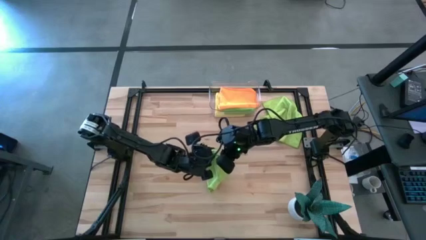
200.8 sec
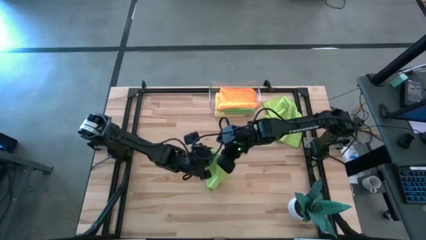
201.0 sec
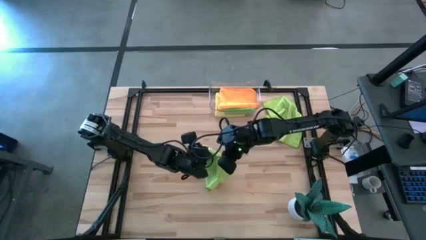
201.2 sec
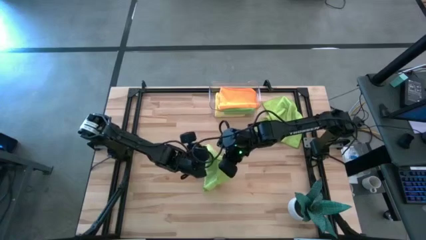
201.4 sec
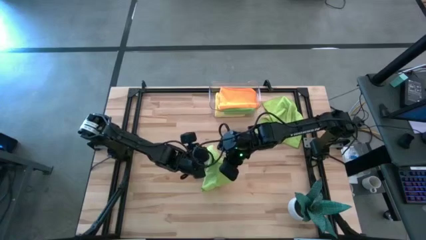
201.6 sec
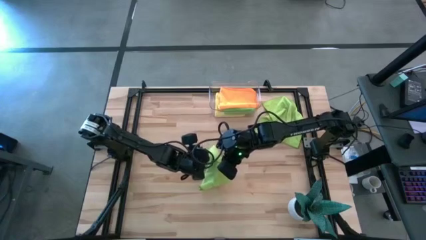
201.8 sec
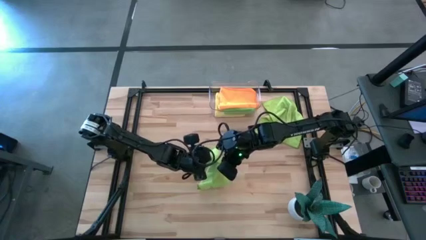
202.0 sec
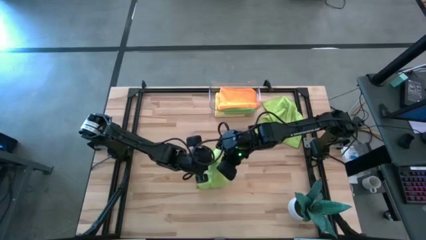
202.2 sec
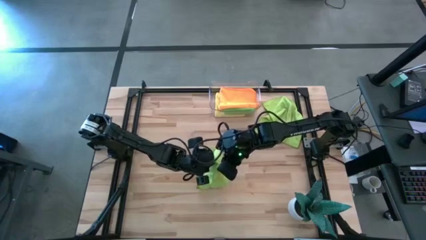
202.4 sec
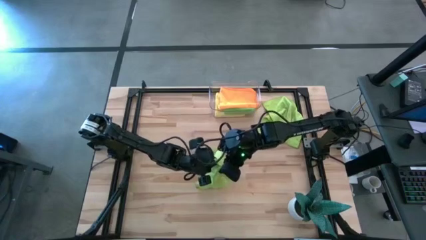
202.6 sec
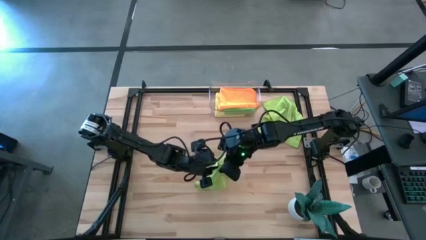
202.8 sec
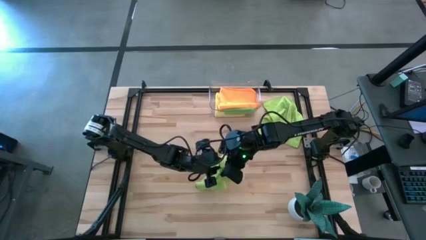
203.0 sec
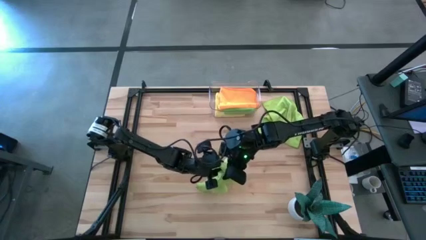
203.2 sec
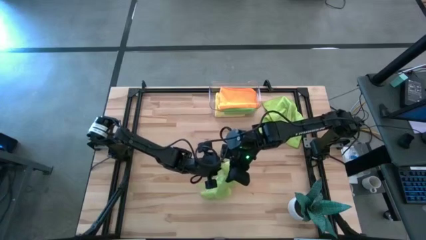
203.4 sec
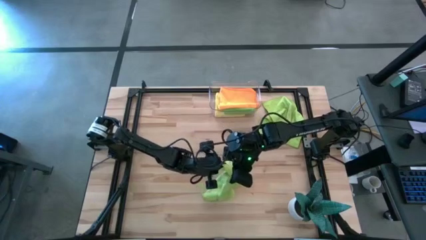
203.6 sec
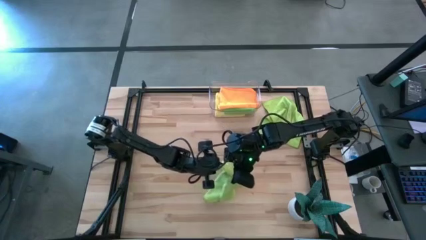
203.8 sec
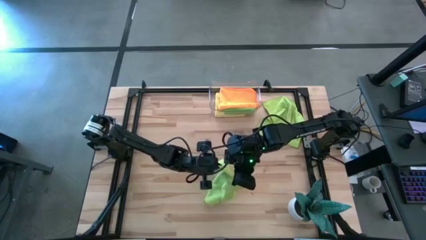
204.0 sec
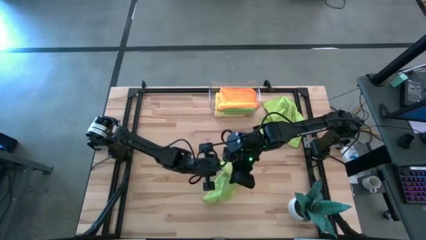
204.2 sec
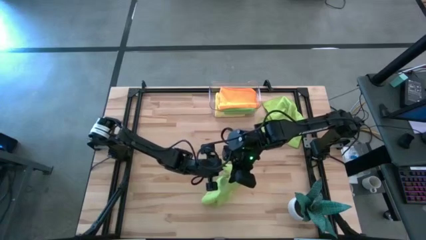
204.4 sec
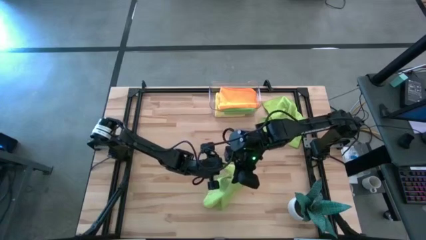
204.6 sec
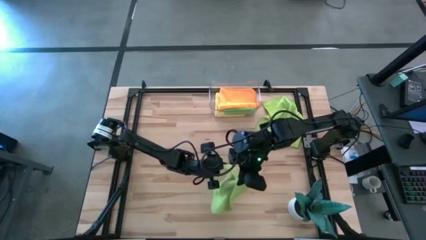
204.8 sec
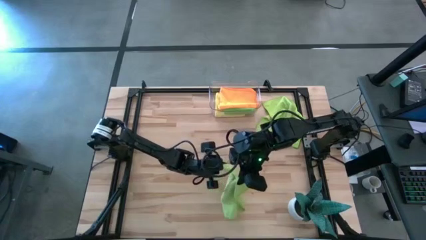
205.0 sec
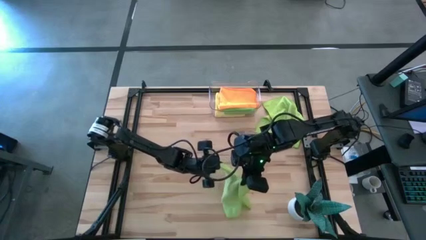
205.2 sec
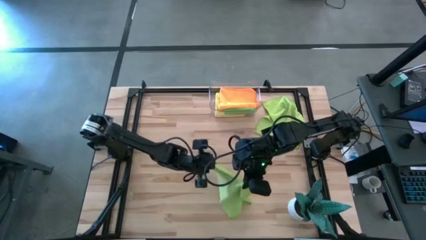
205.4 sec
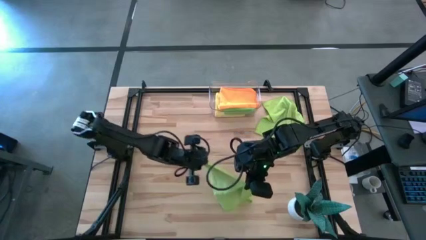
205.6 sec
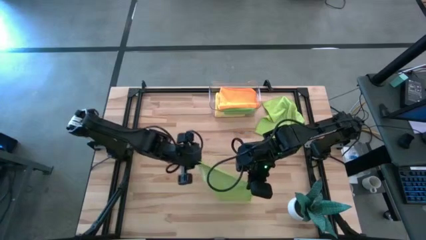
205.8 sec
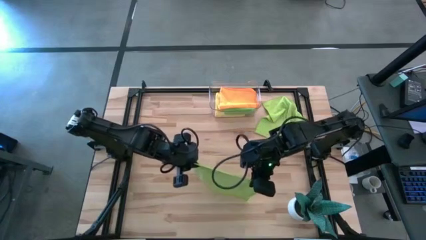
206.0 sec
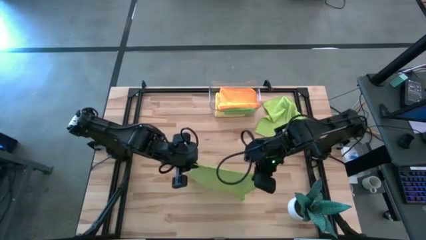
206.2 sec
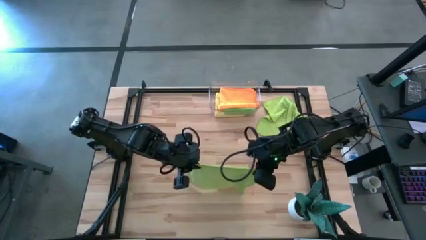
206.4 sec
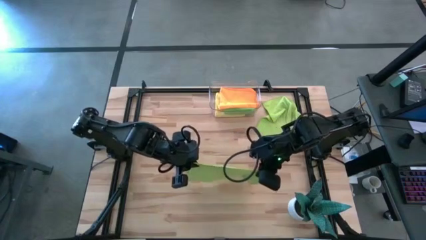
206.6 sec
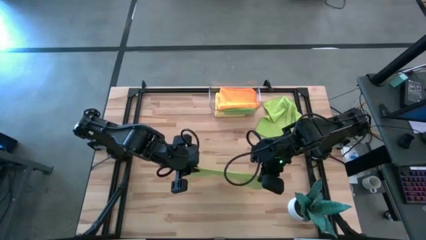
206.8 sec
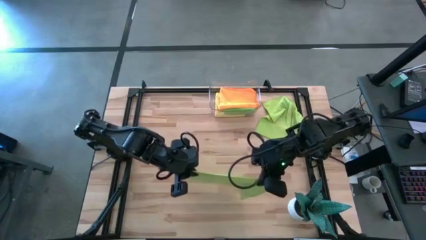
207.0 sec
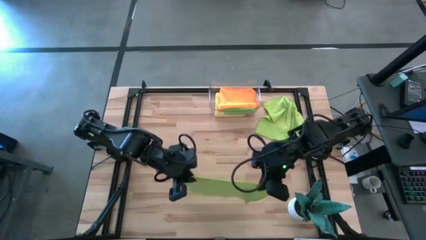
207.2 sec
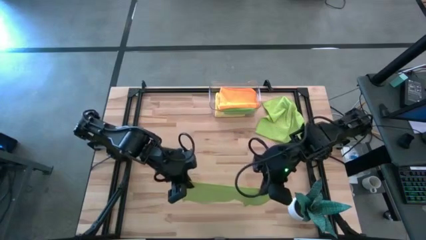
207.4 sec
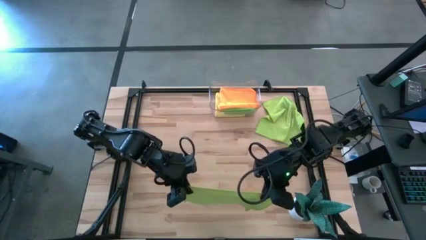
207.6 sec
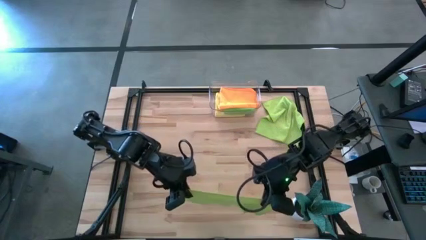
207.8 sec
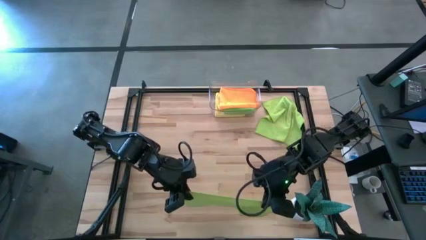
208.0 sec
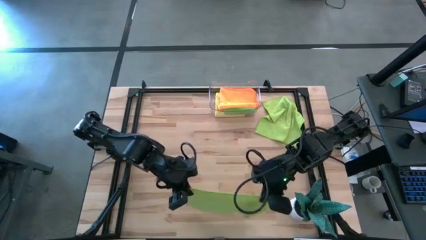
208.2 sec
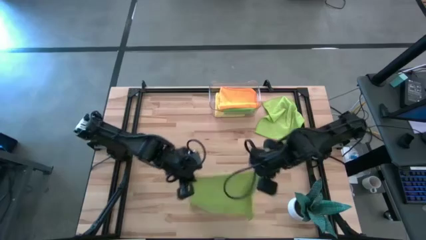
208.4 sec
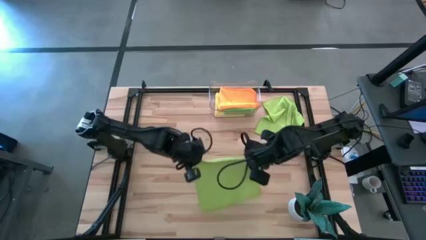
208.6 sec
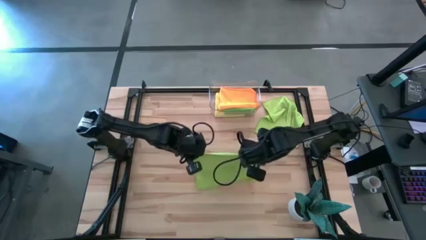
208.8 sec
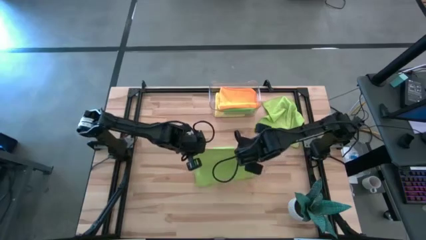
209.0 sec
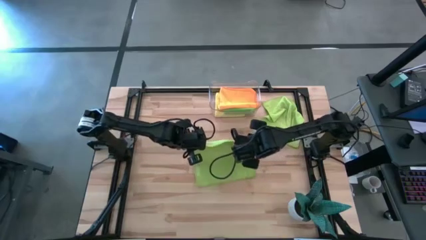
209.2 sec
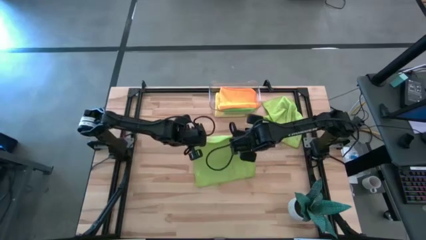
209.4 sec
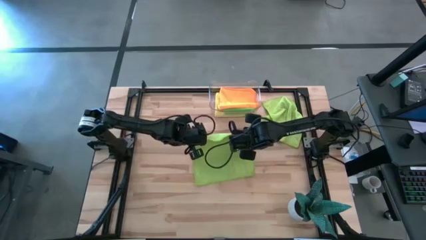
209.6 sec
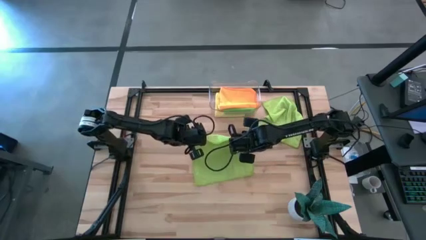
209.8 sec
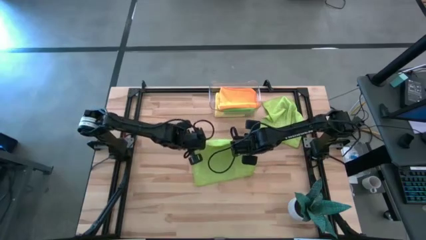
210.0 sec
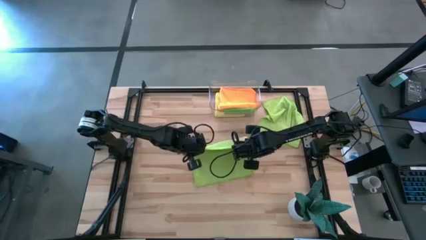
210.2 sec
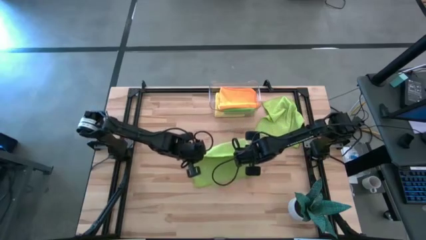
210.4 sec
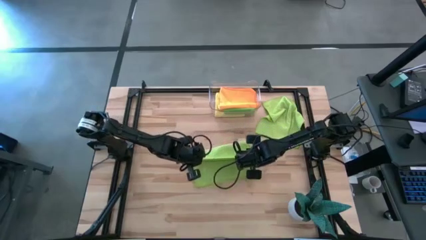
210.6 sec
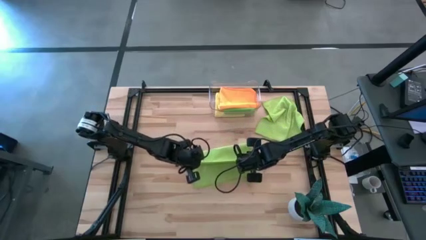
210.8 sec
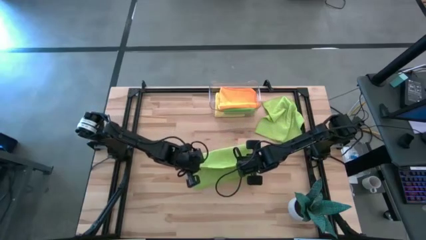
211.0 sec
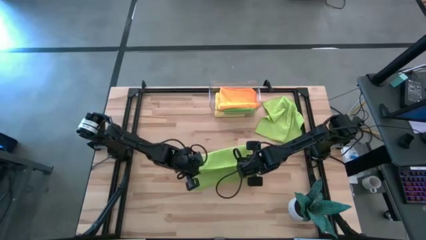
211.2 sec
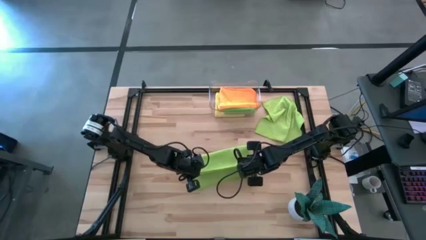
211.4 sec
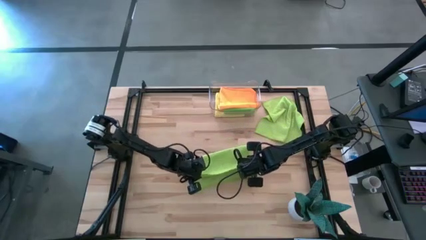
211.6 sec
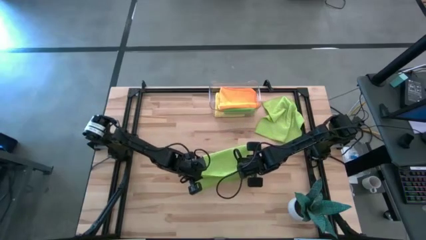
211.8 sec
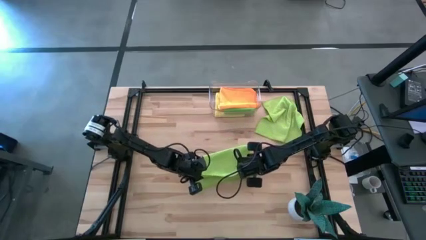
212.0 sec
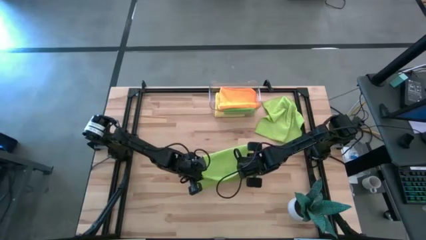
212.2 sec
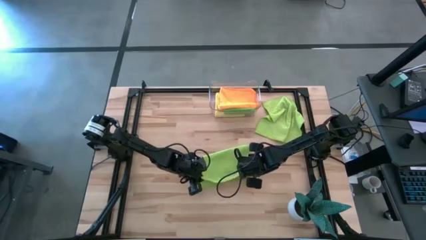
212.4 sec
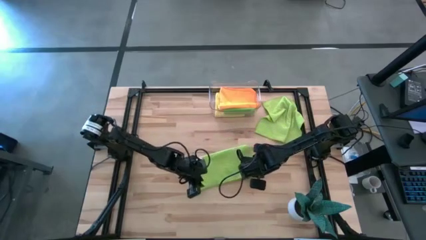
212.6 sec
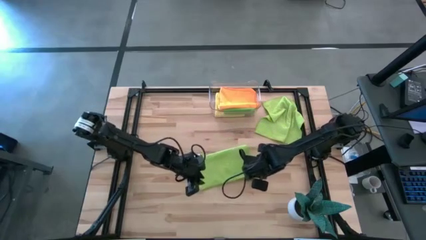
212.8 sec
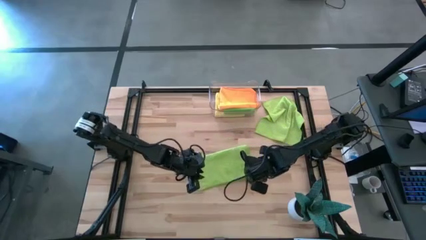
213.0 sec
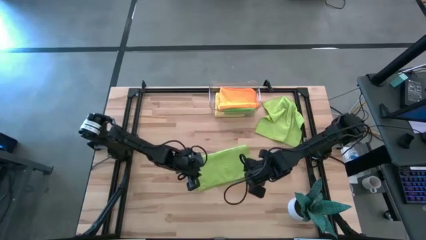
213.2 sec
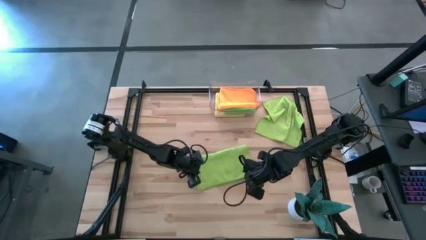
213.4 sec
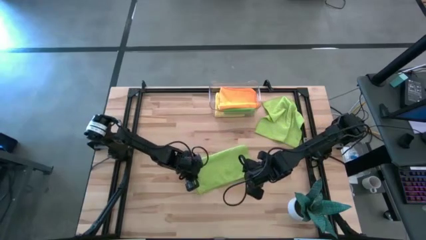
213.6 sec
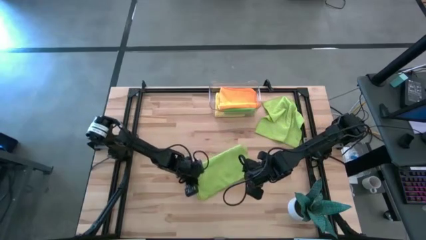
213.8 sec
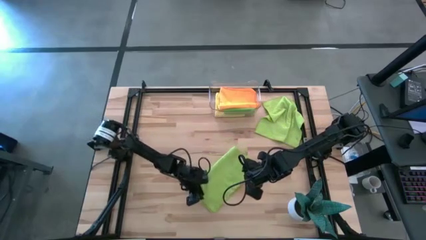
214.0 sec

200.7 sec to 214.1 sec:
Task: Fold microfiber towels
Fold the light green microfiber cloth
